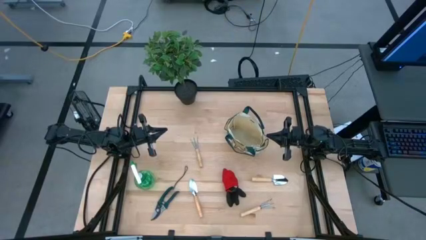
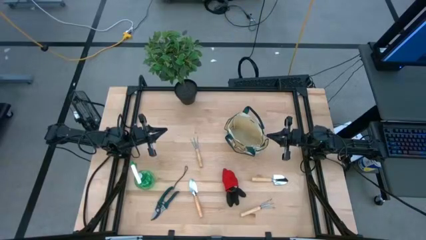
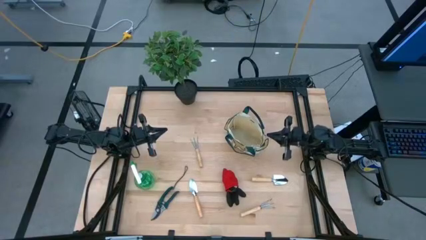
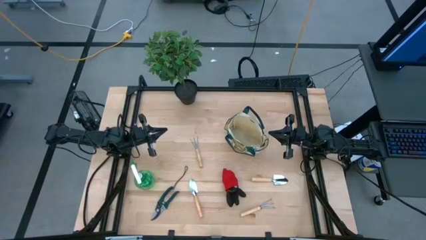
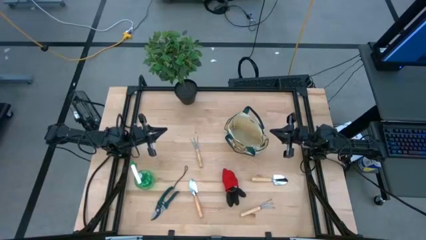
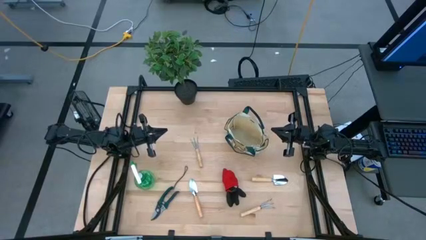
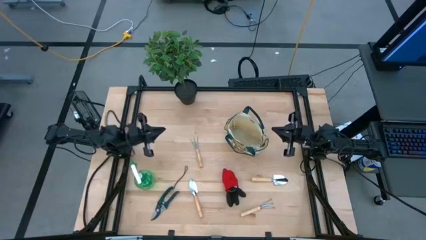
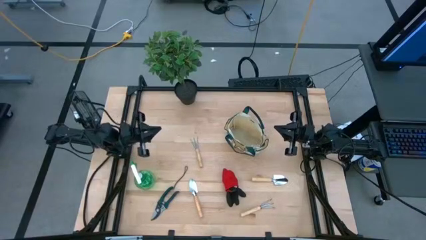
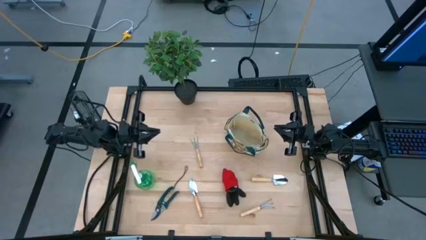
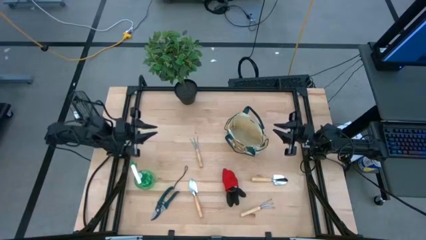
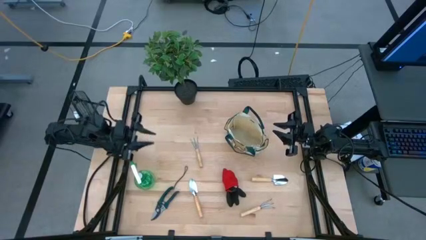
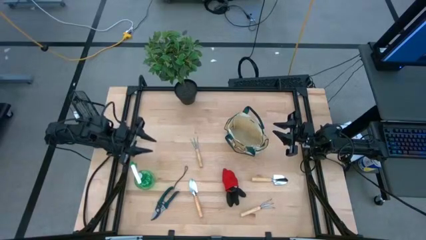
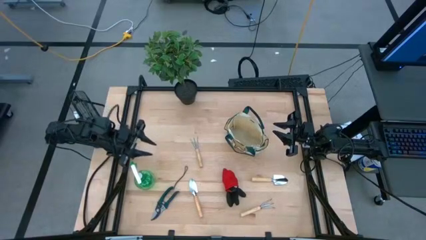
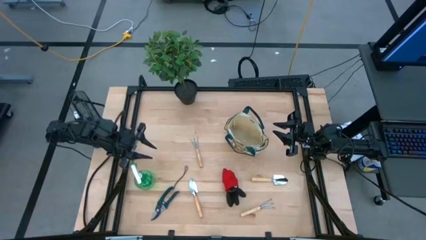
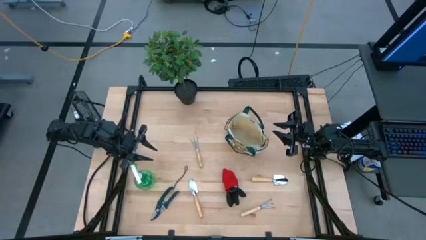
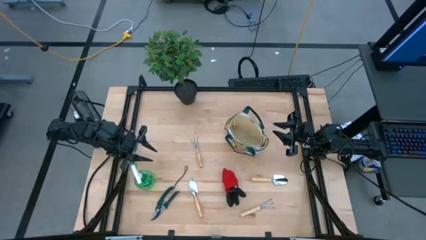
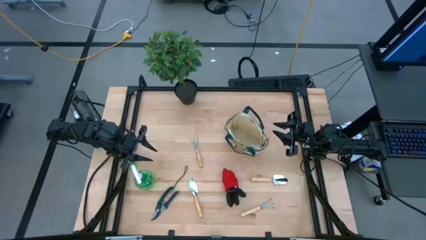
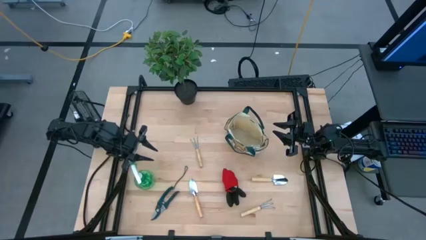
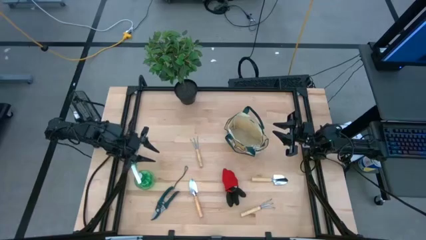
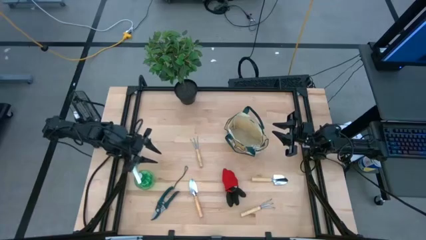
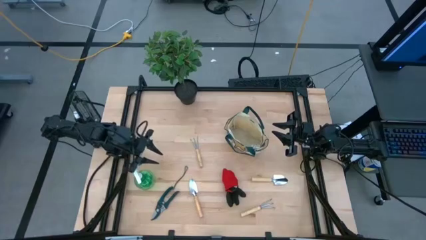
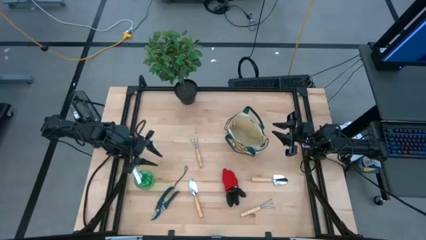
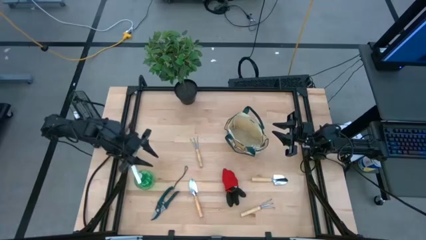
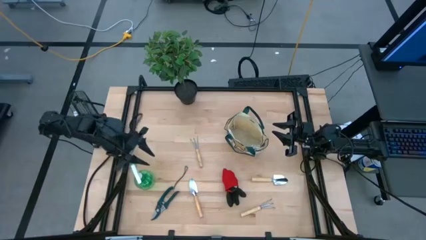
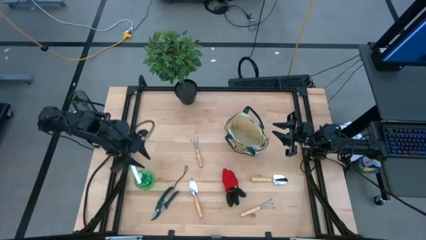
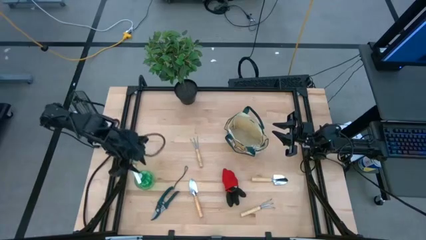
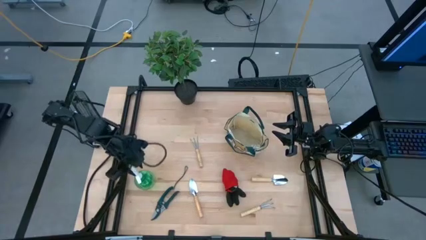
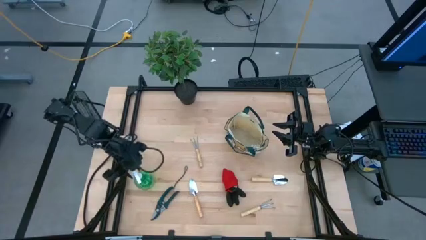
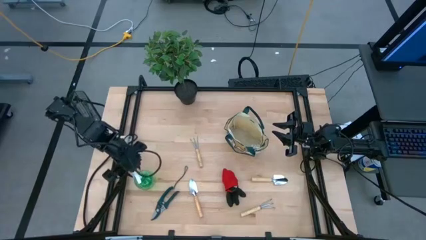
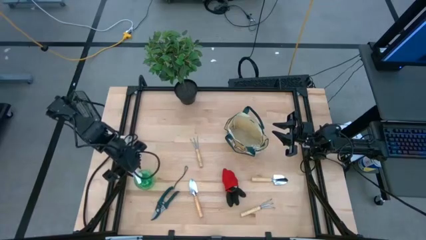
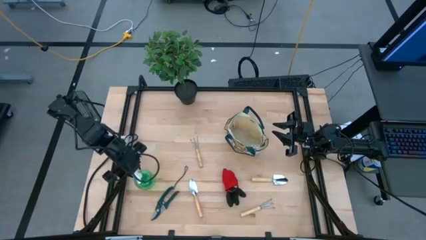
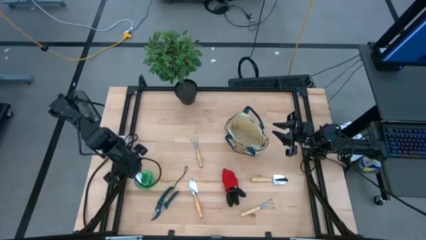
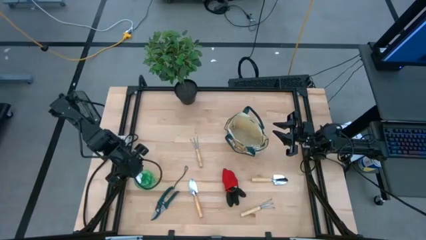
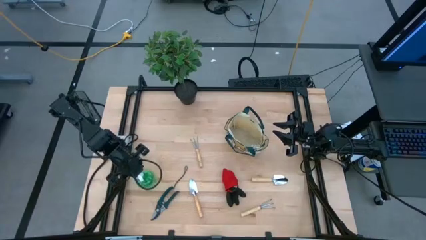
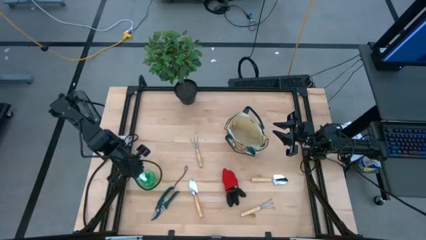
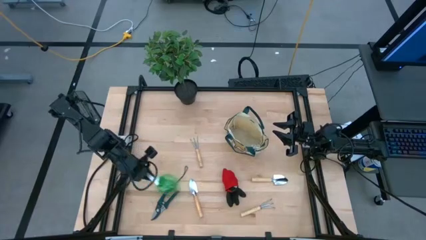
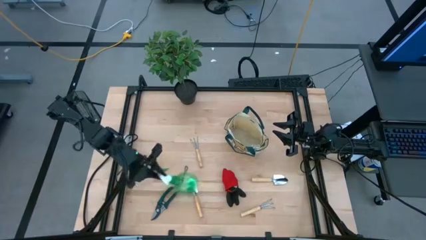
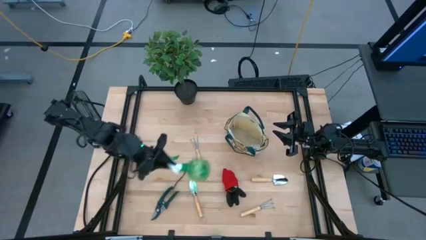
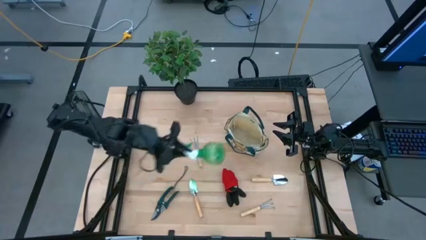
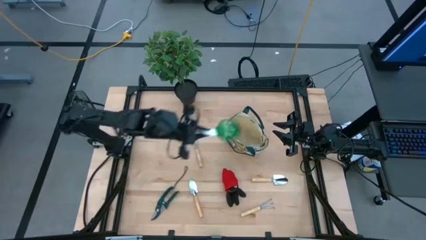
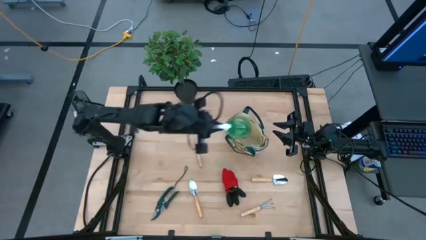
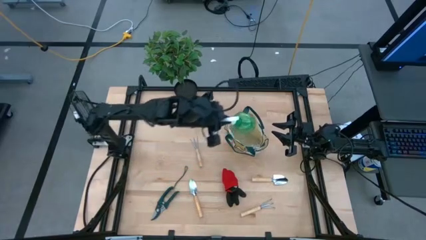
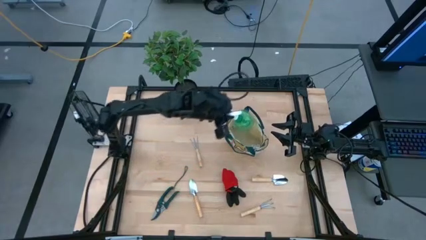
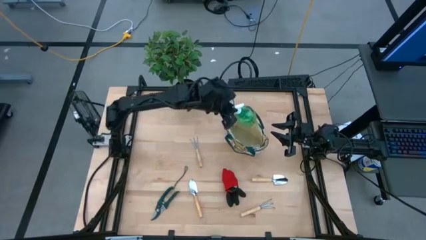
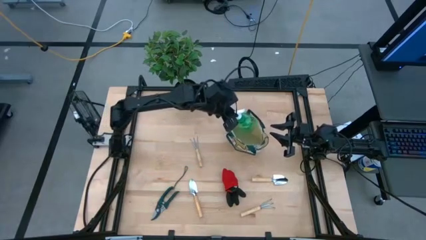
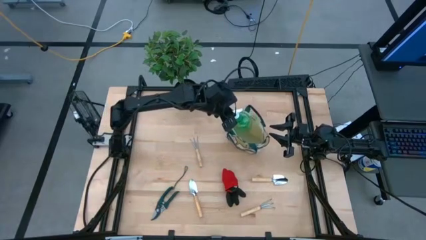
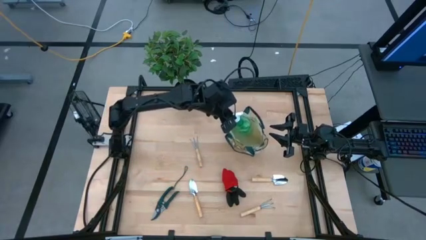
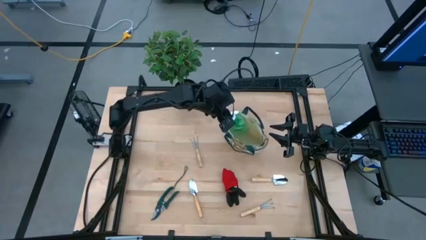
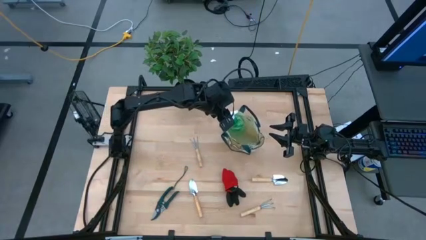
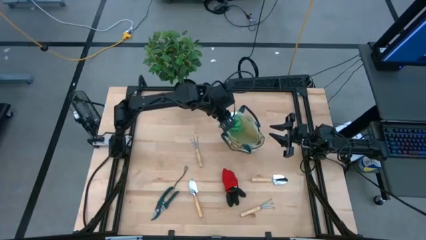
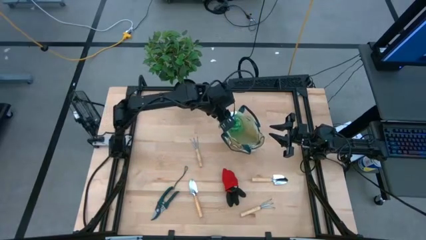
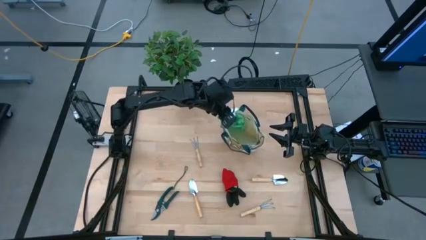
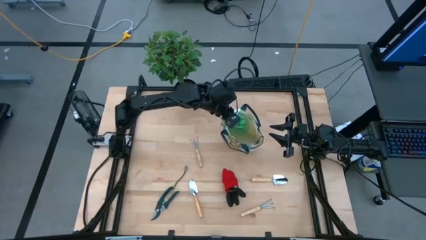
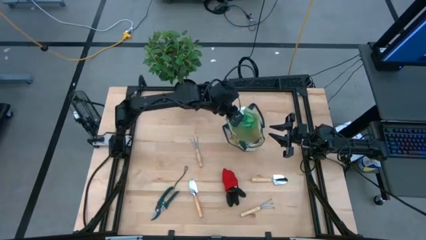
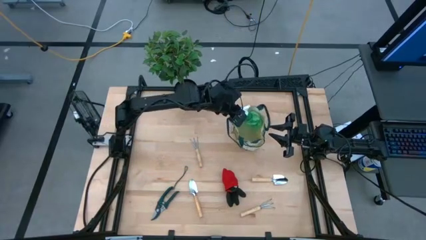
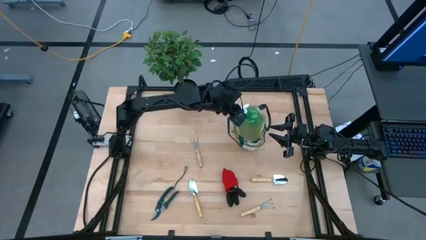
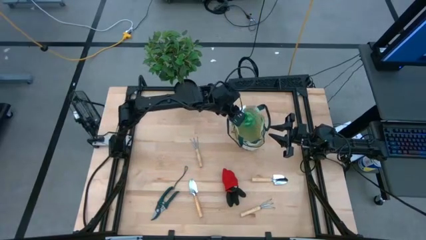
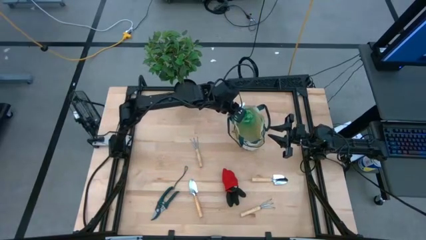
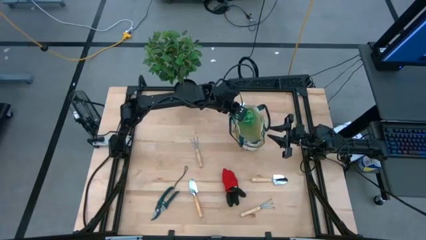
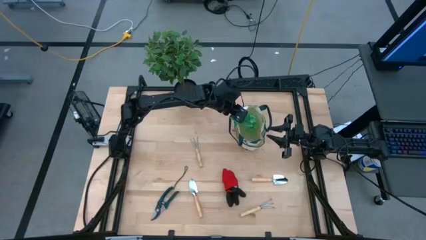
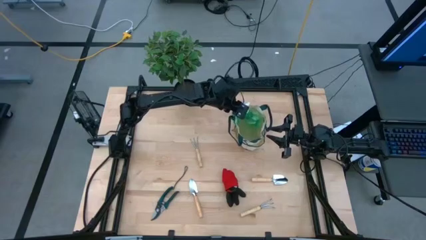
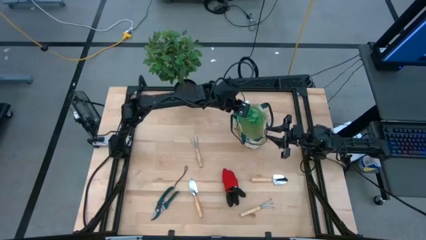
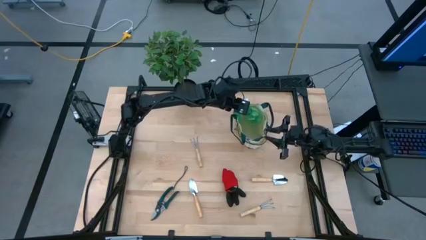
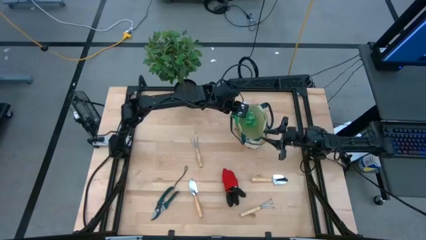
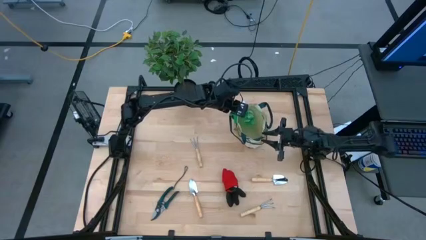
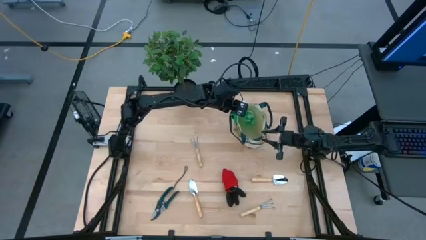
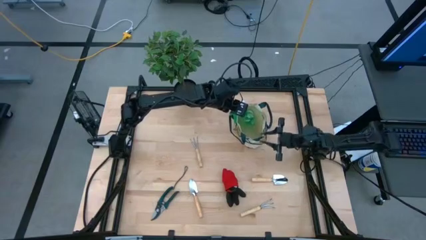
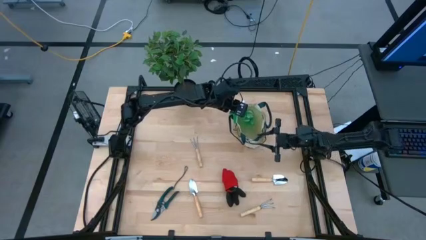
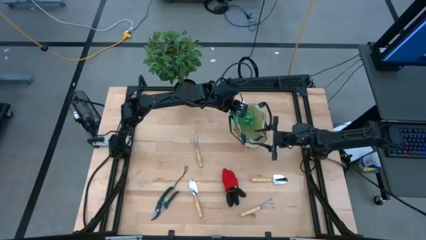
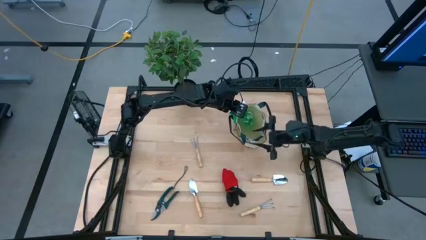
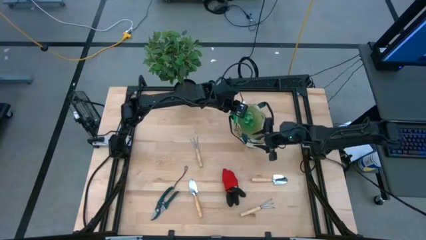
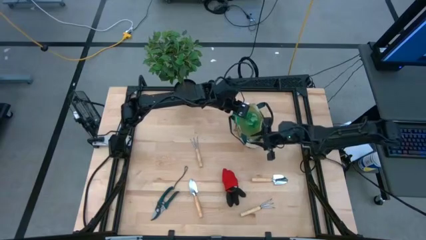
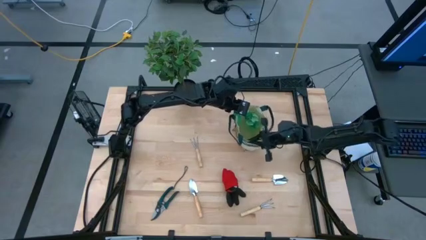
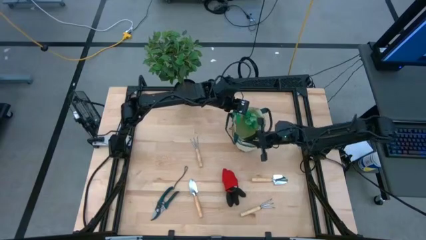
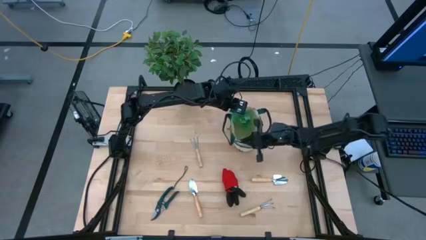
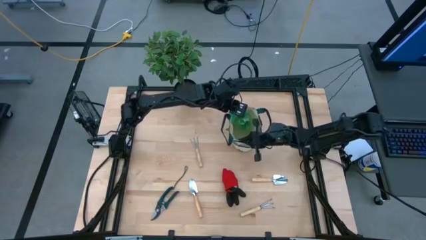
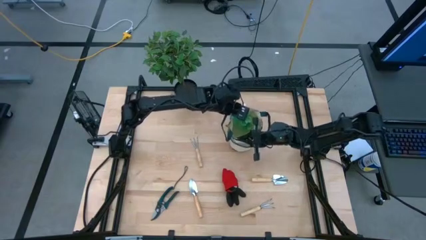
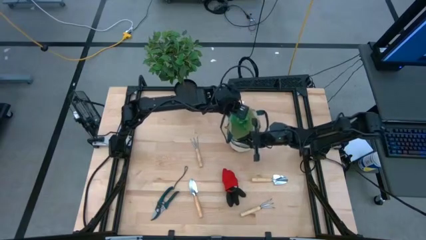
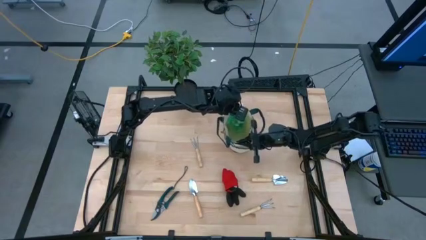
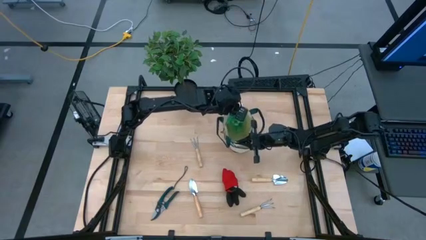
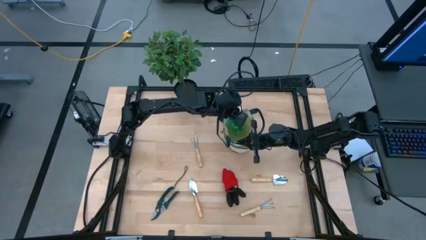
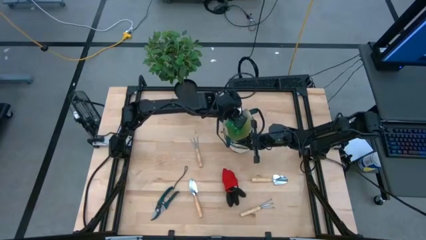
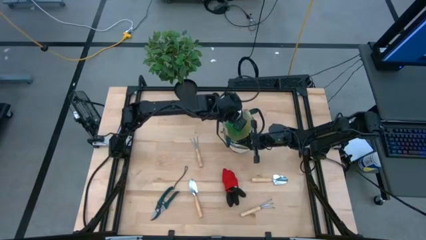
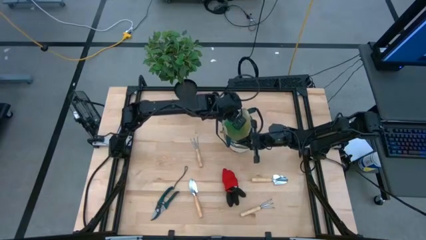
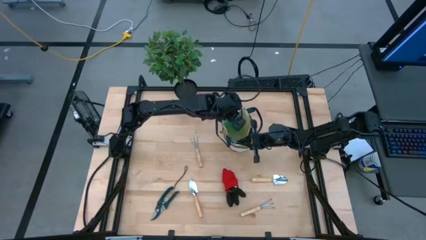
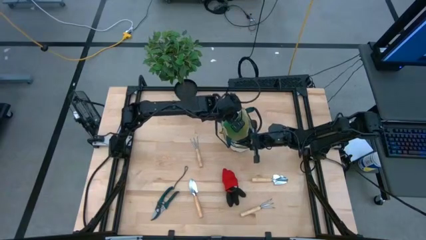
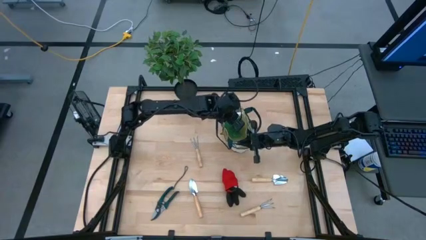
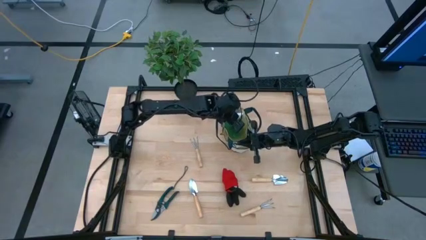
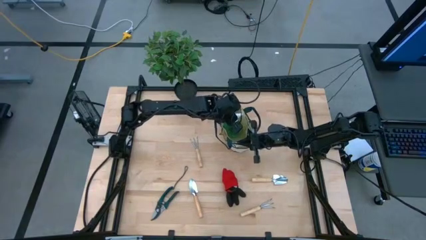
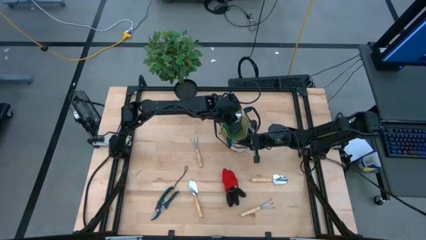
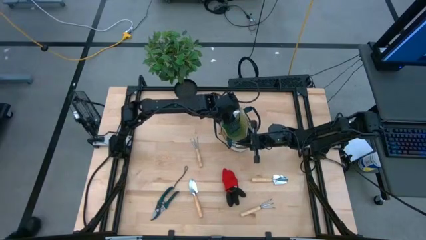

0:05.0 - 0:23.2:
Task: Pick & Place Garden tools in Gardening bag
Put the green spray bottle into the light brown gardening bag
